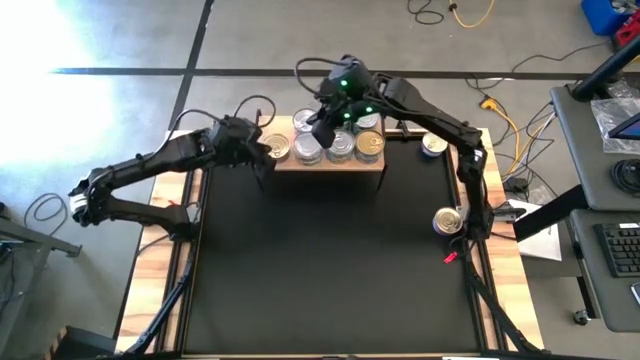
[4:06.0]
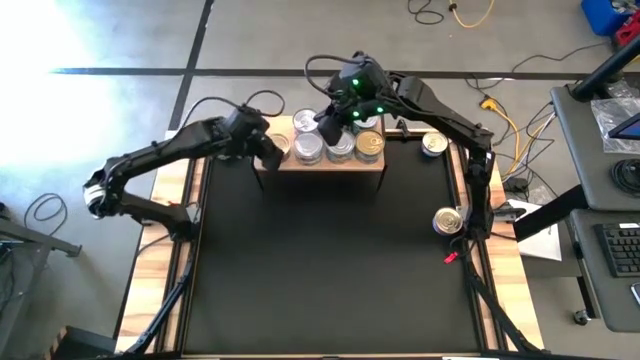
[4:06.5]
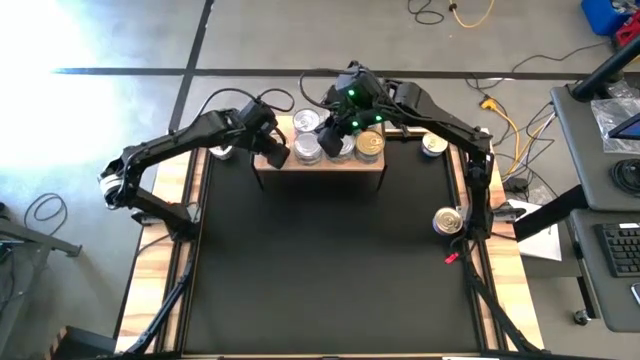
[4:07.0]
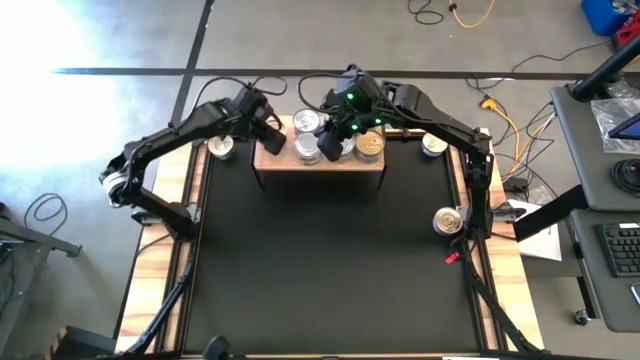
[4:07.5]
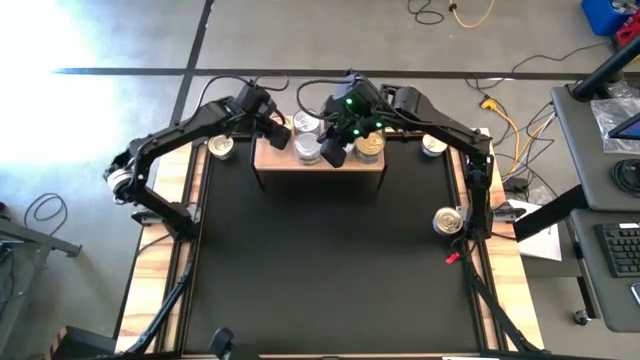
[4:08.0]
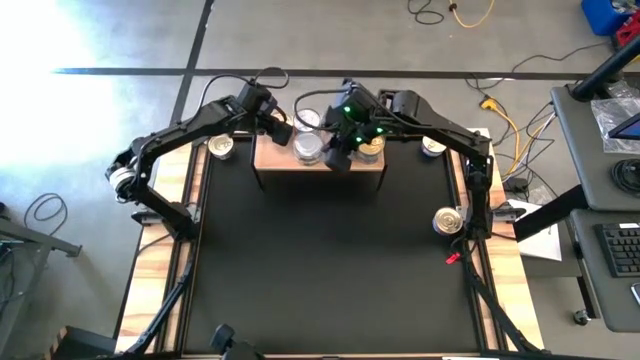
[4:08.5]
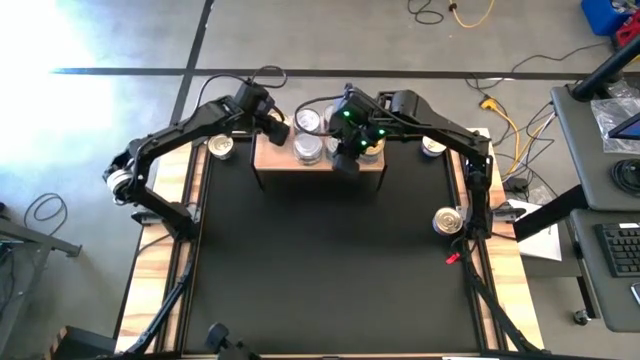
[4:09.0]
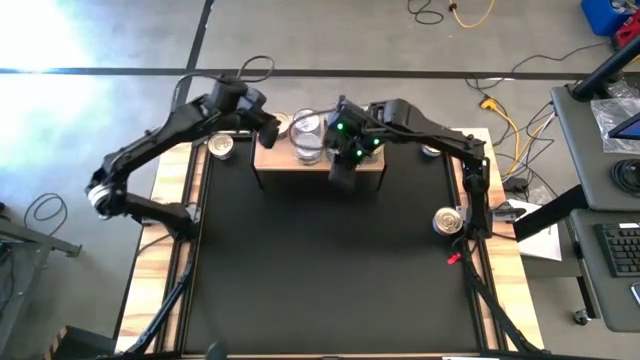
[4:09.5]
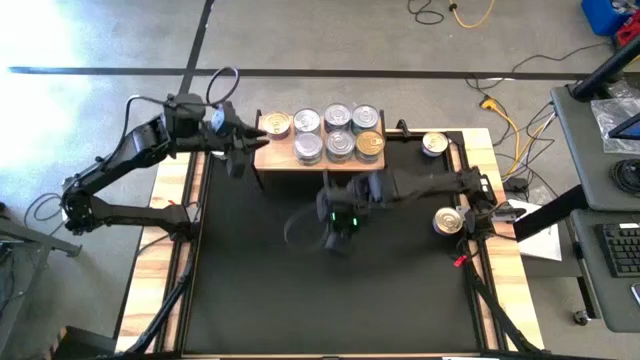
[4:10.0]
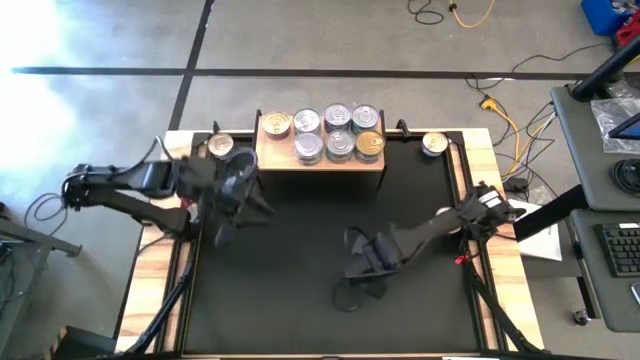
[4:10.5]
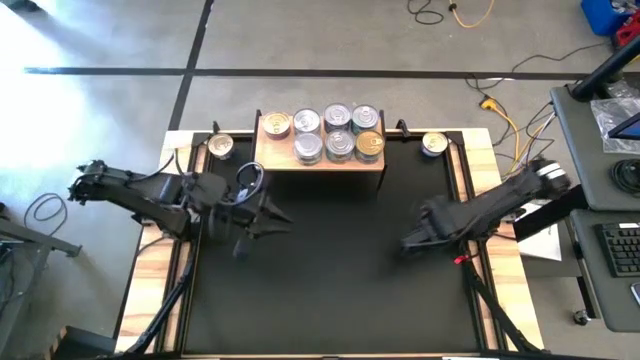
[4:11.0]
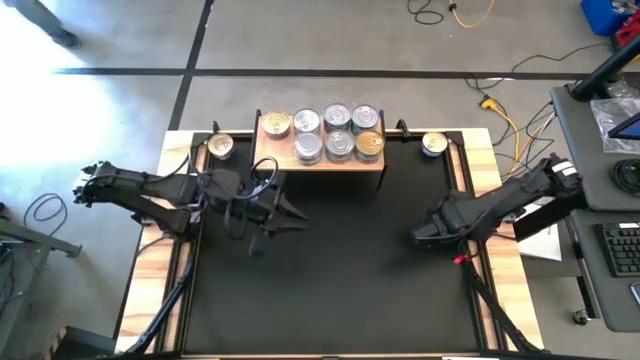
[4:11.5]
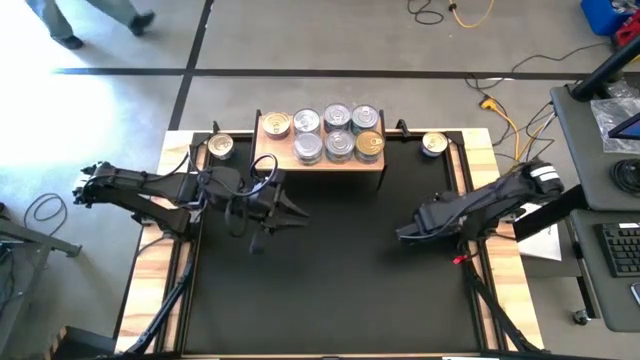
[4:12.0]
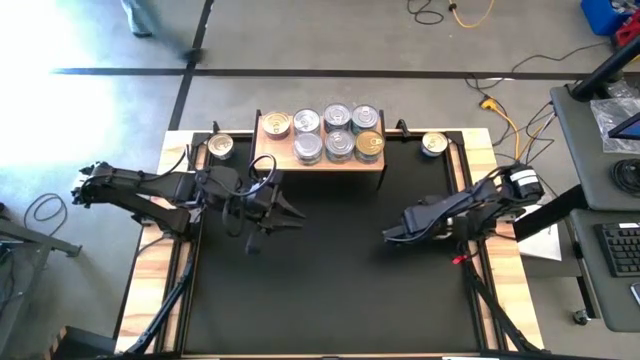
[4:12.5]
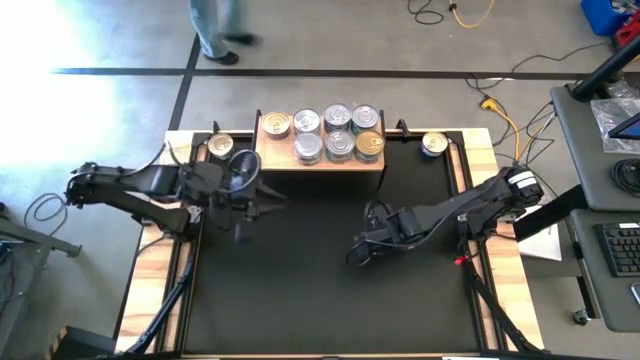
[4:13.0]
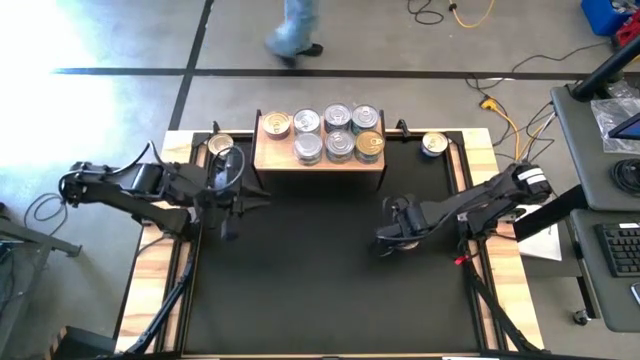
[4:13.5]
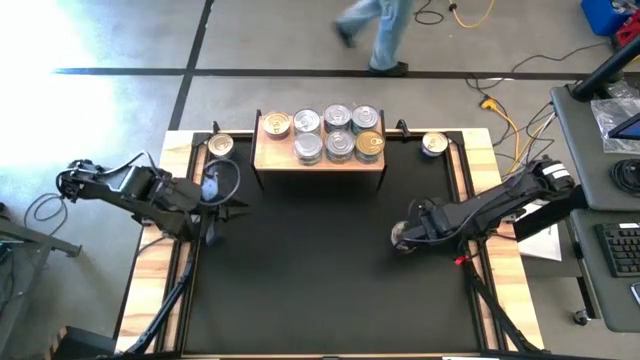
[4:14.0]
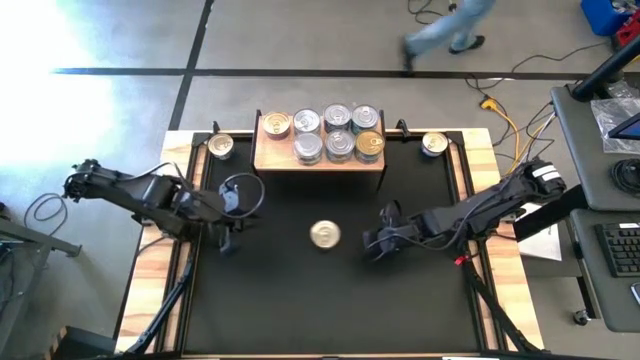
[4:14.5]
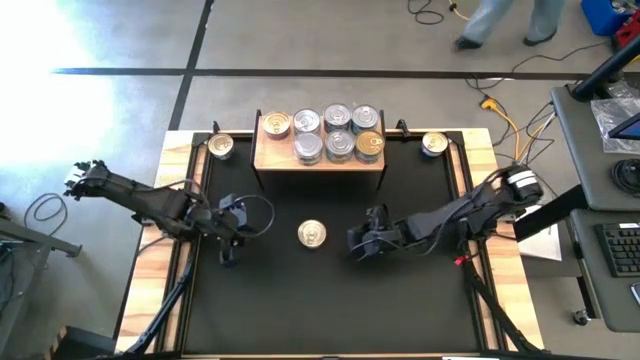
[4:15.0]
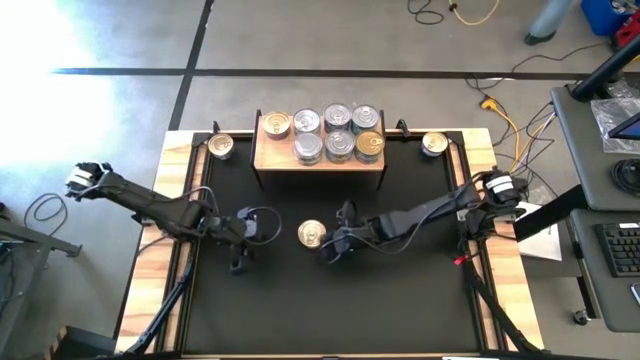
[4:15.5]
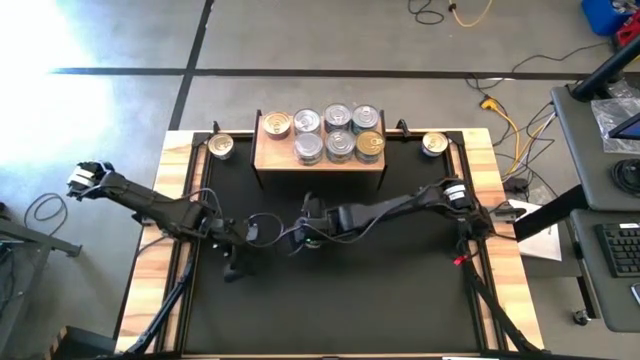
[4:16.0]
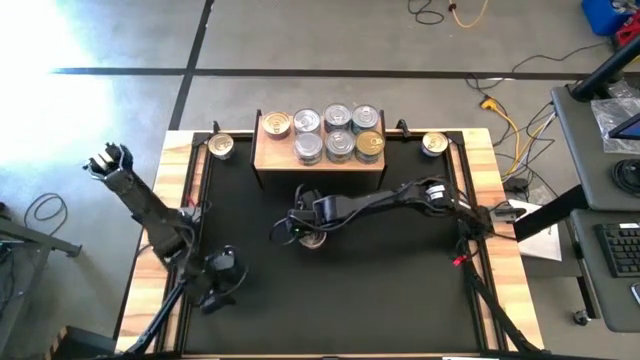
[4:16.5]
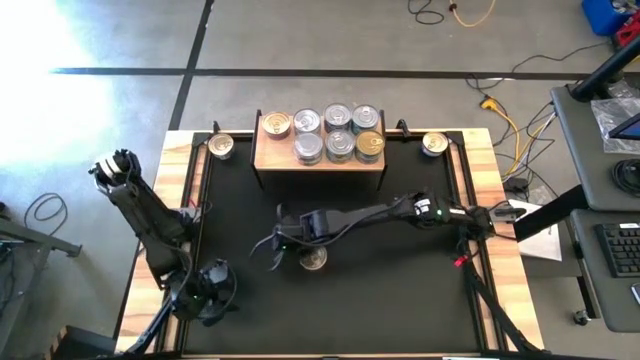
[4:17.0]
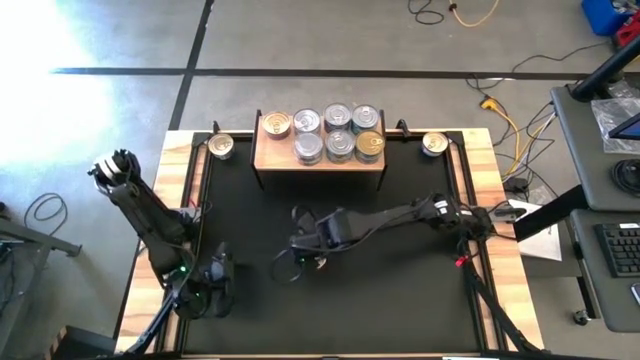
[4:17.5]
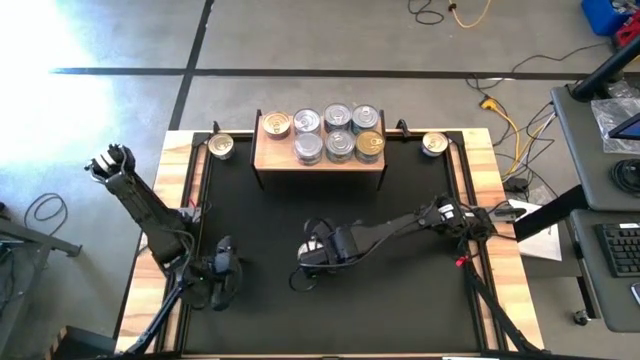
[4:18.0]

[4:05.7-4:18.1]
Task: Stack canned seafood by type on shelf
Put the bottom right blue pink tuna can on the shelf aligned with the other blue pink tuna can

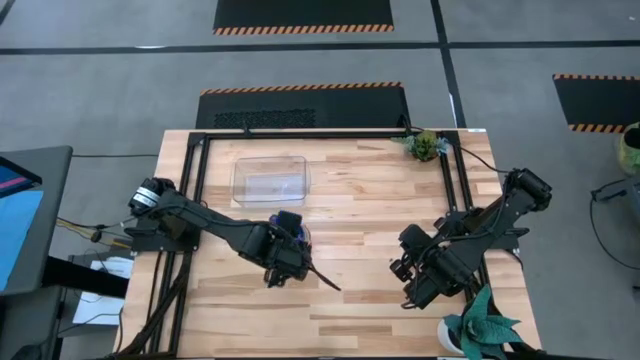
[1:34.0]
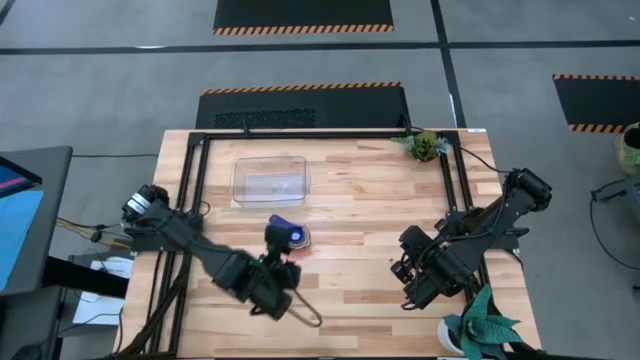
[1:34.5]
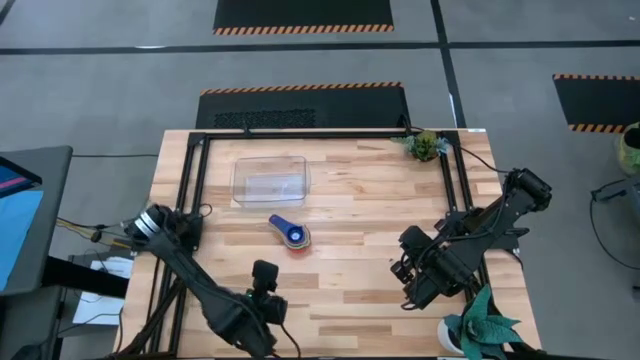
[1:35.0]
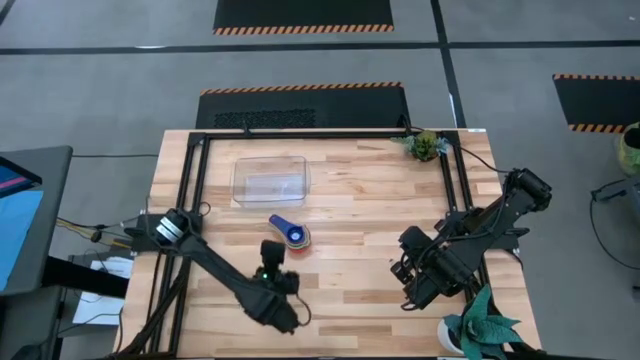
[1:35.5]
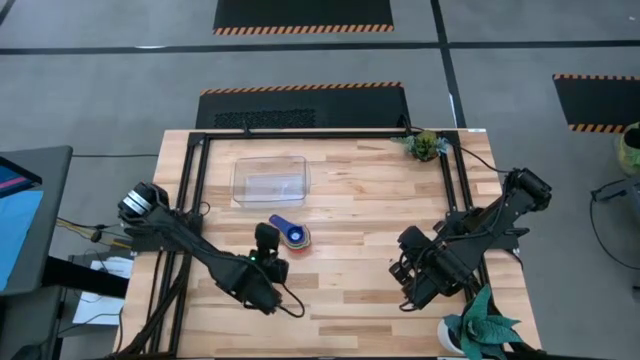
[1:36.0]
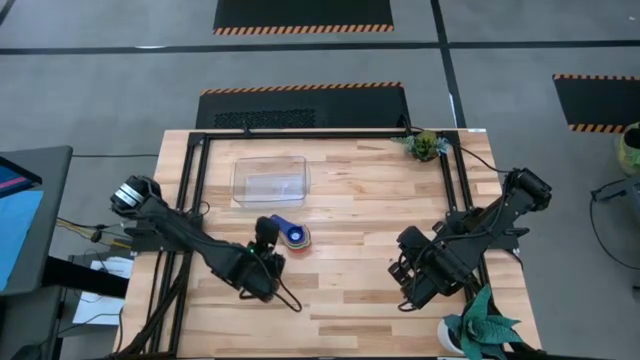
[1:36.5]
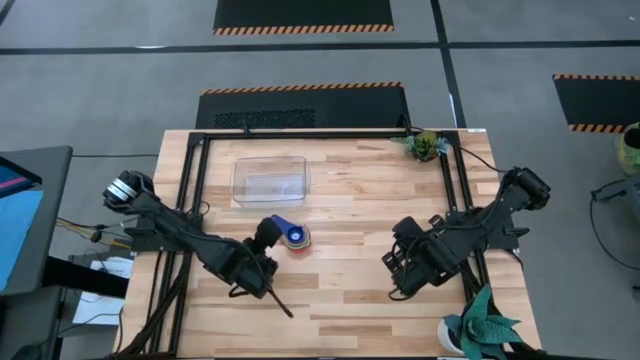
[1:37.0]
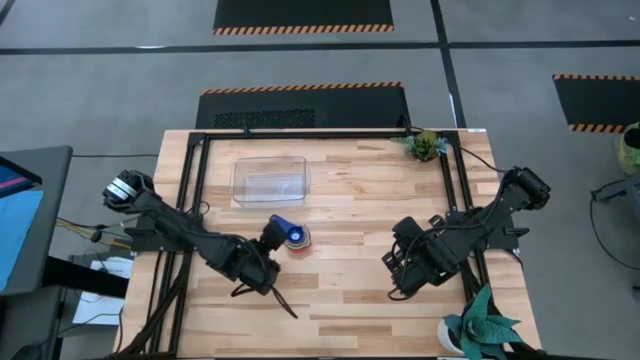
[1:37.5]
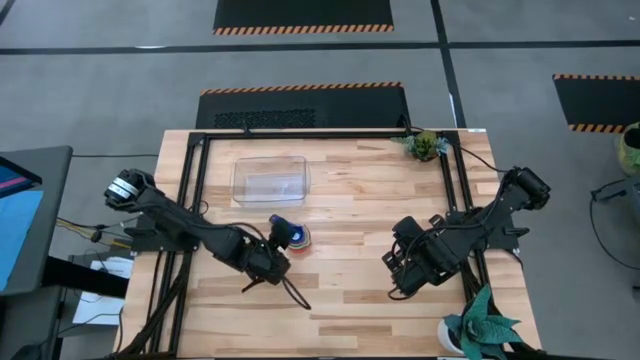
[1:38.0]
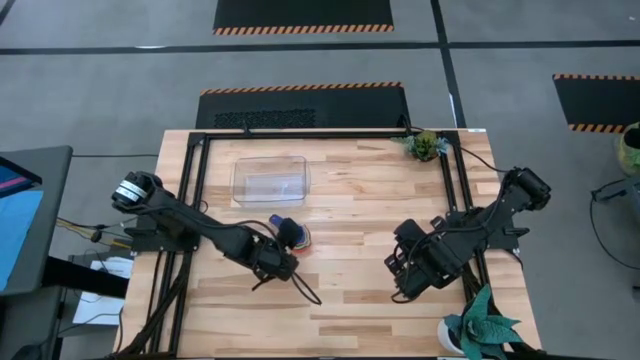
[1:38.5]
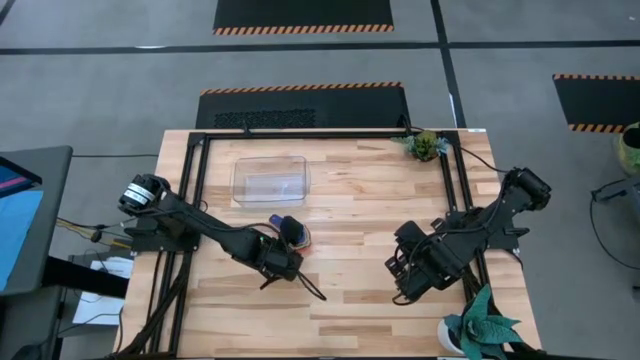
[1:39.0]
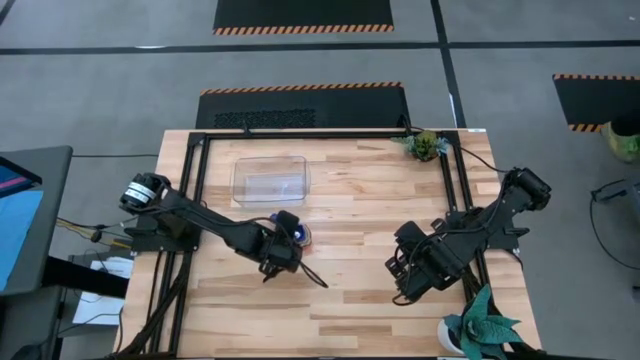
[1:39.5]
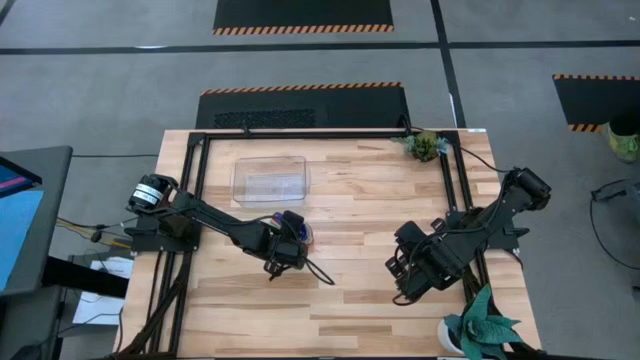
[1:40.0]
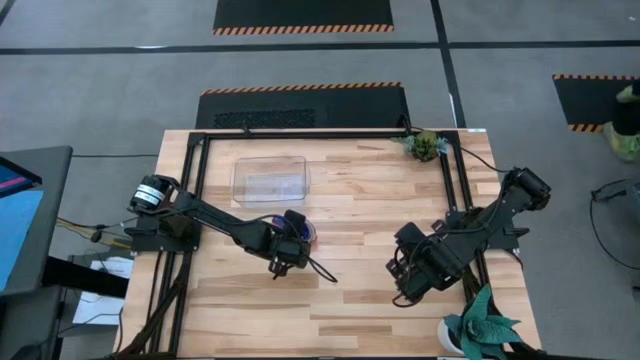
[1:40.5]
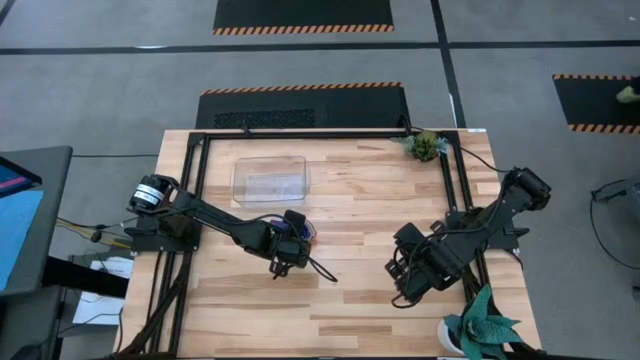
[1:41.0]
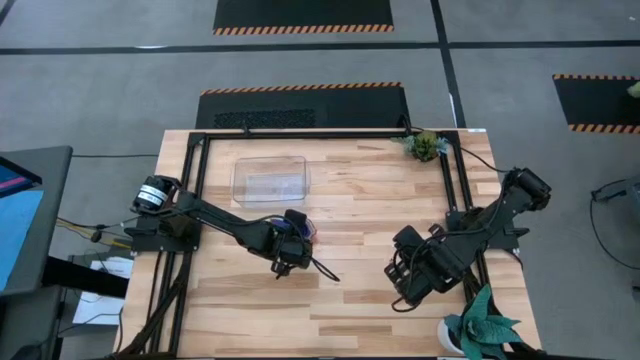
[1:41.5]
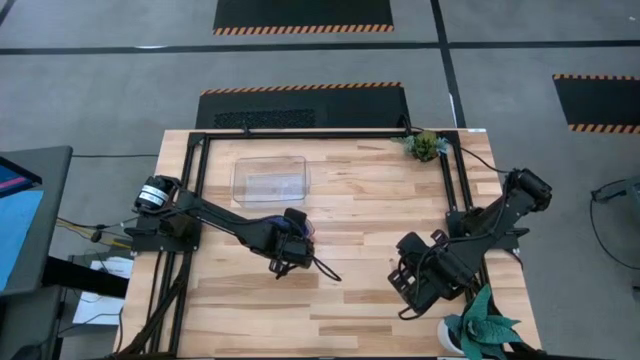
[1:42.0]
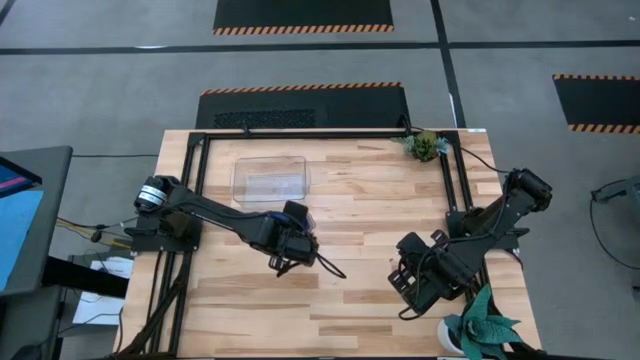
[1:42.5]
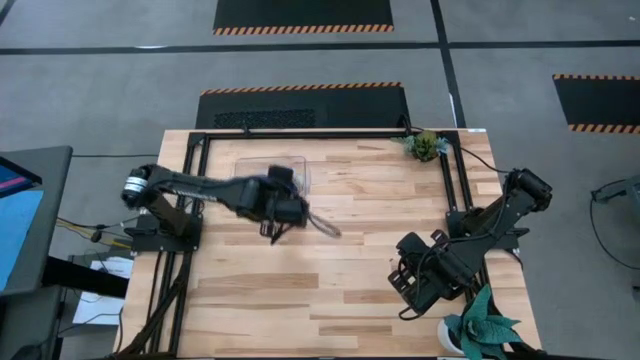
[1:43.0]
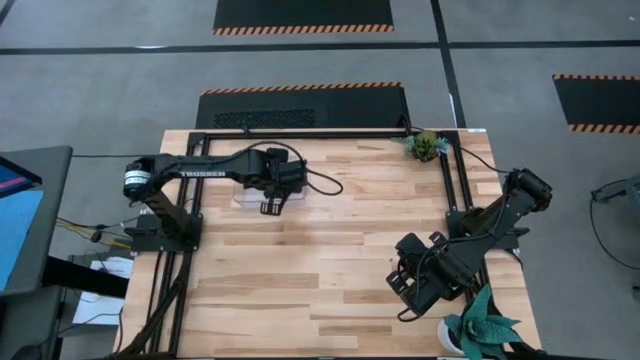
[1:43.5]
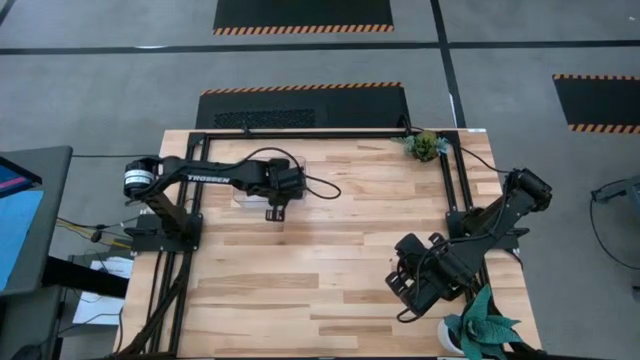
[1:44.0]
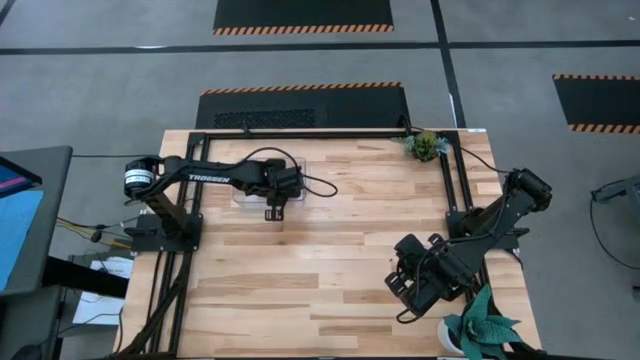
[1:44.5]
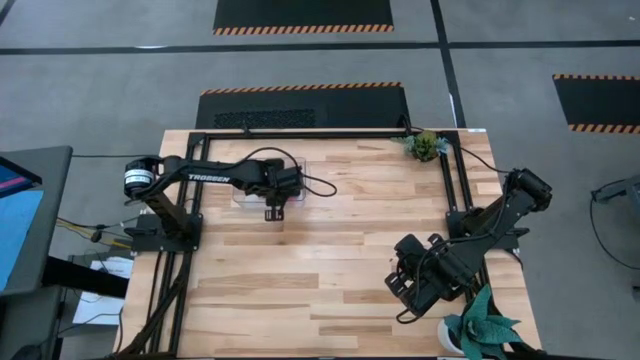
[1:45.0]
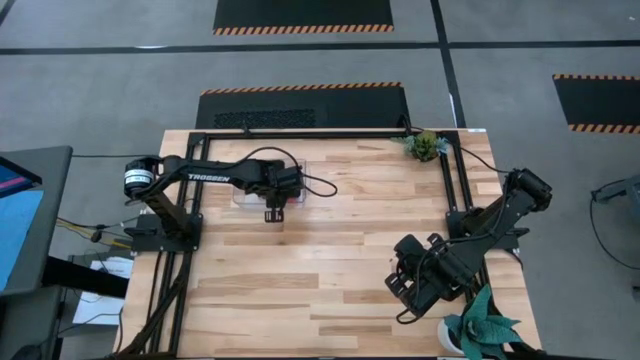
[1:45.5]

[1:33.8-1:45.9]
Task: Nest measuring cups in basket
Put the stacked measuring cups into the transparent bin
